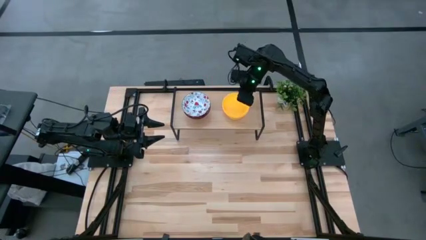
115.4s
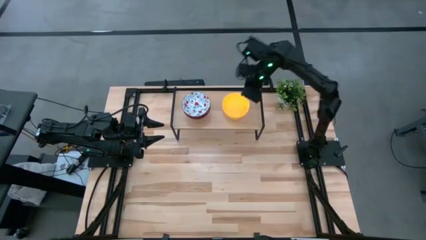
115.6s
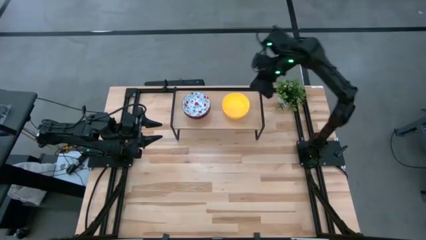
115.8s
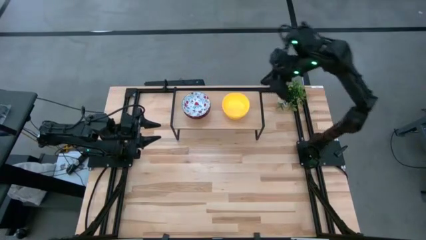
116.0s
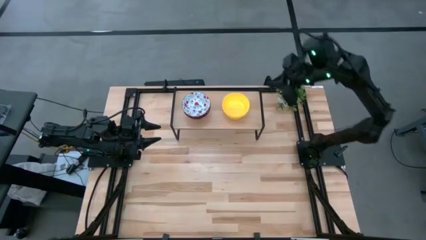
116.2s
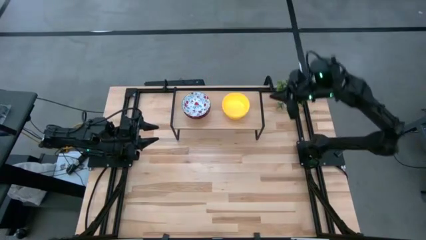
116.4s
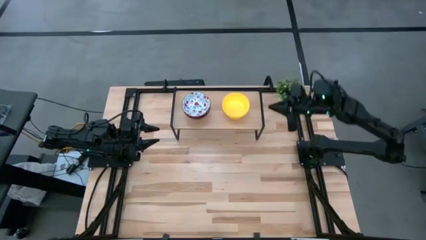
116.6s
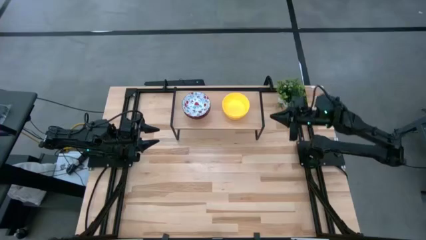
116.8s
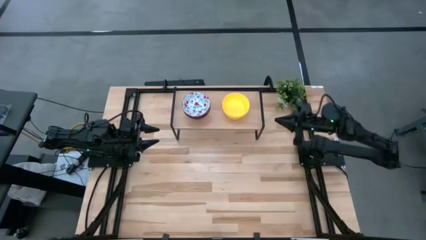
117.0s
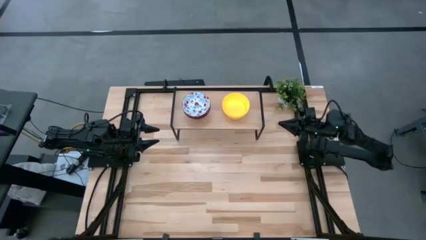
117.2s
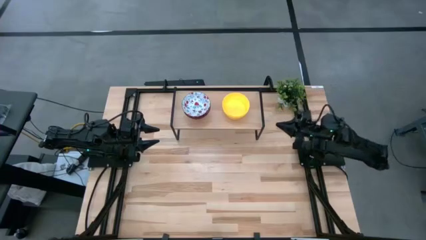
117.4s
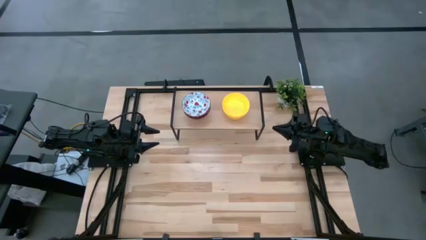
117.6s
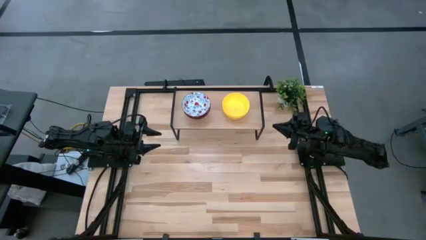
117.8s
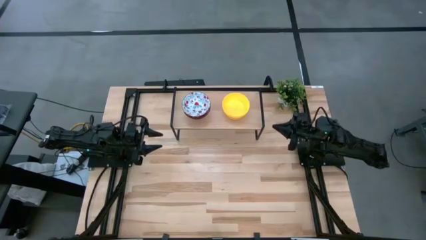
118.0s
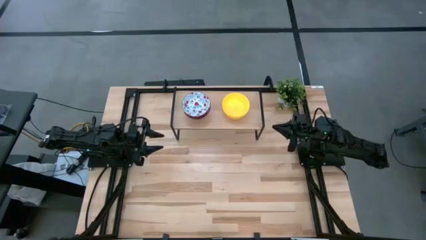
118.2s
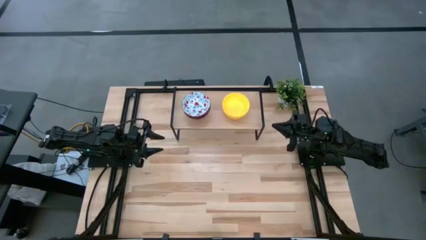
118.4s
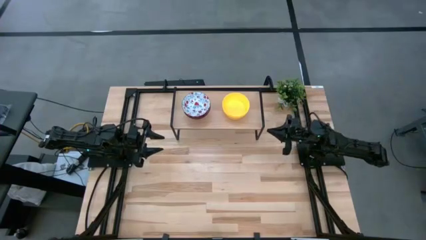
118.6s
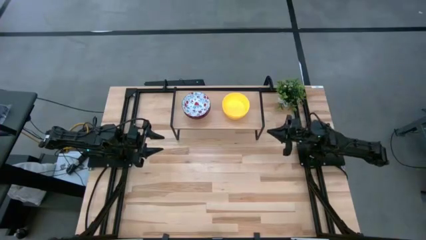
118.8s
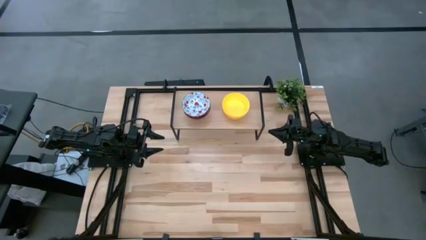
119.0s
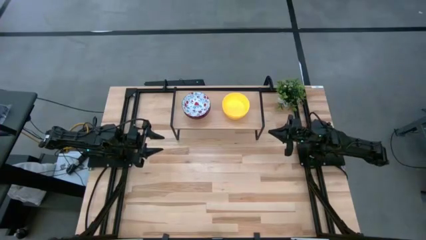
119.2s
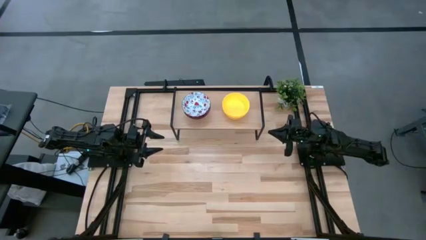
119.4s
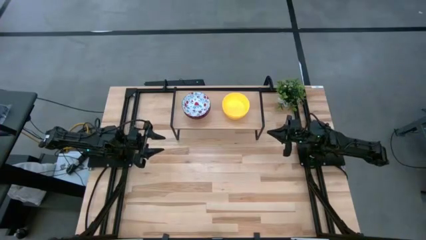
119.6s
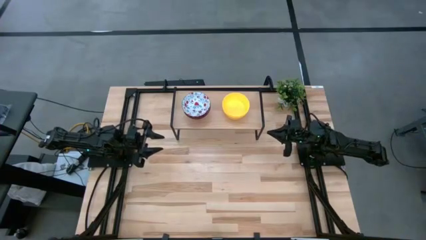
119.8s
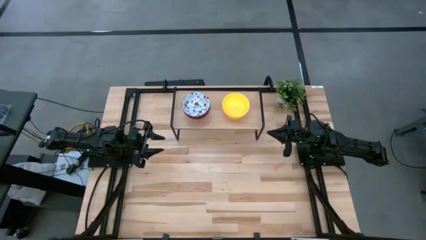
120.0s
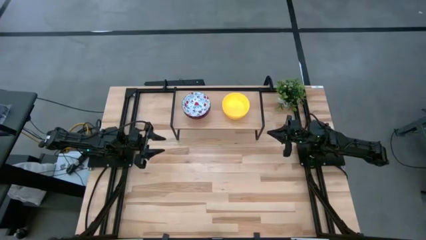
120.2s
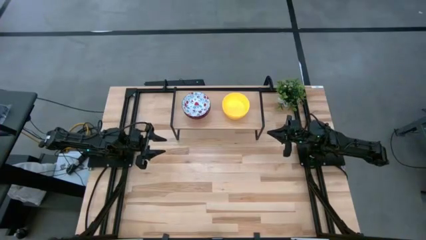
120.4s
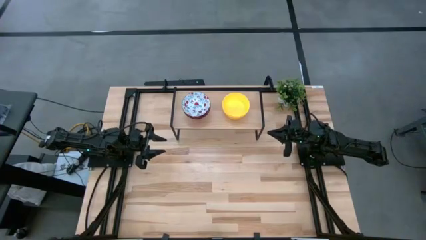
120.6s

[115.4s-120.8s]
Task: Pick & Place Mini bowls
Return to Home Position

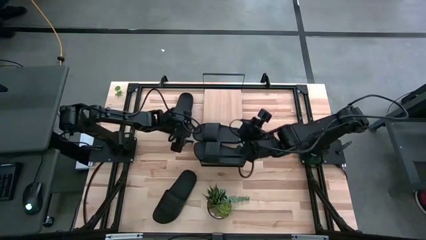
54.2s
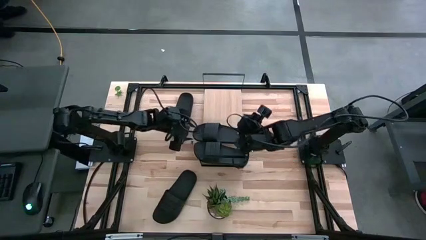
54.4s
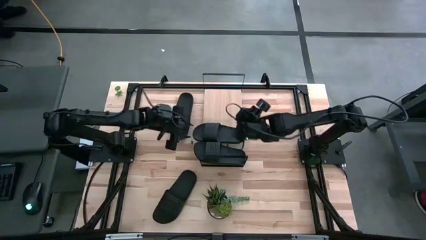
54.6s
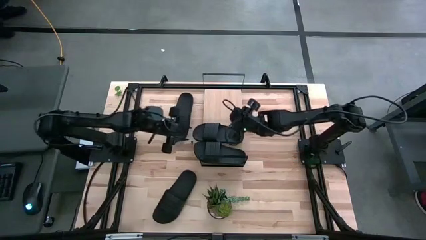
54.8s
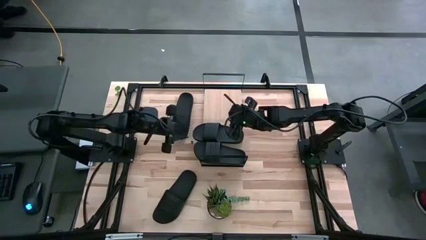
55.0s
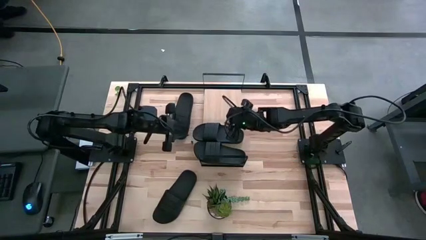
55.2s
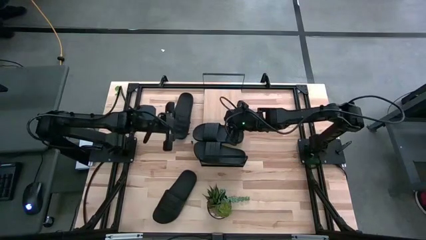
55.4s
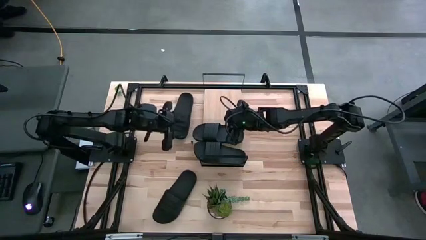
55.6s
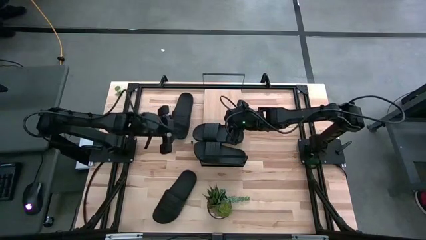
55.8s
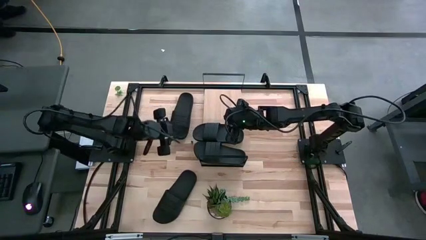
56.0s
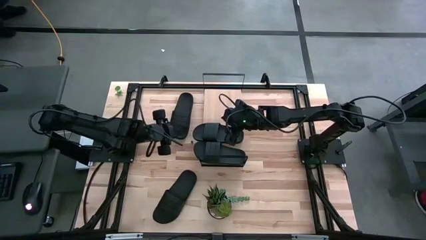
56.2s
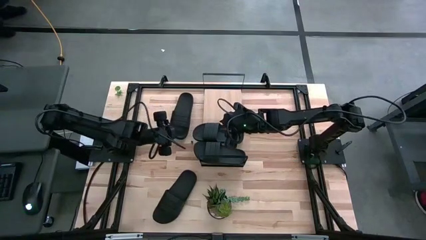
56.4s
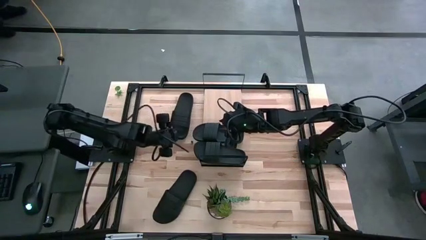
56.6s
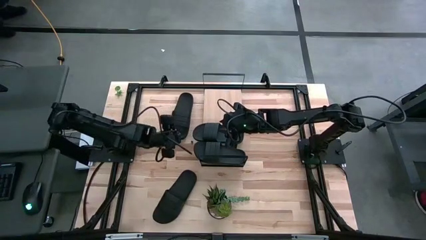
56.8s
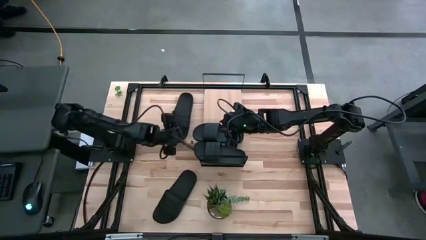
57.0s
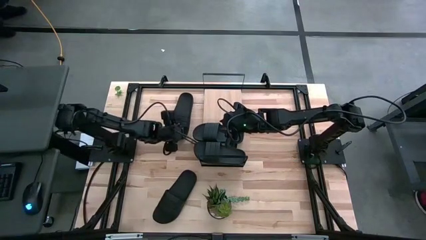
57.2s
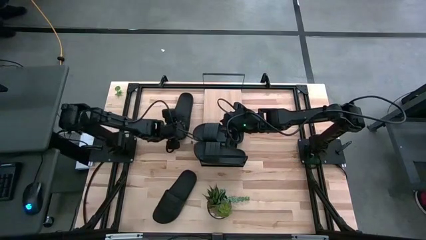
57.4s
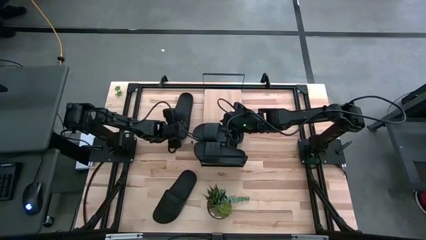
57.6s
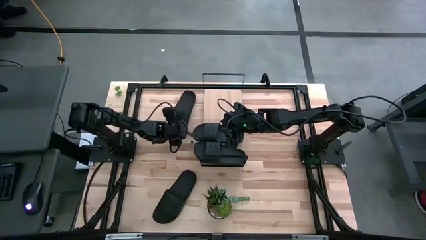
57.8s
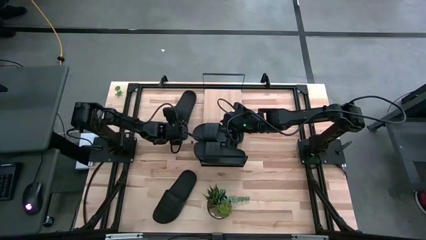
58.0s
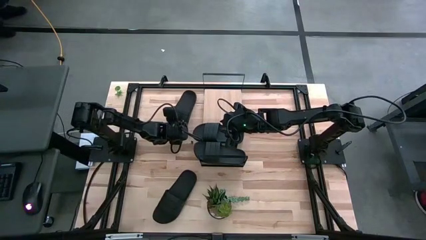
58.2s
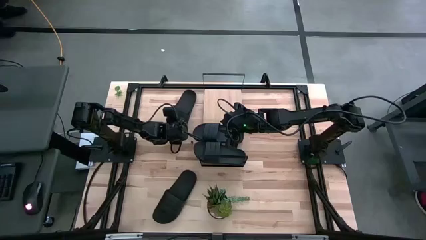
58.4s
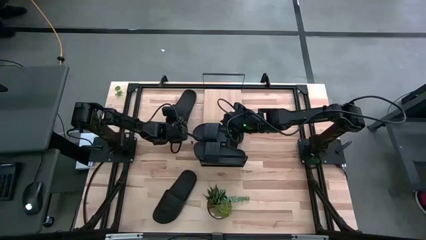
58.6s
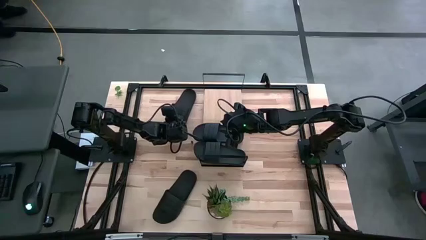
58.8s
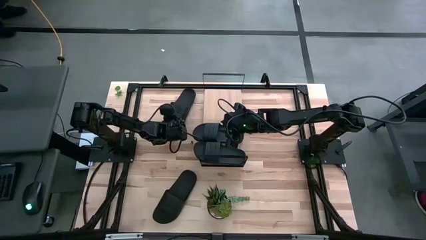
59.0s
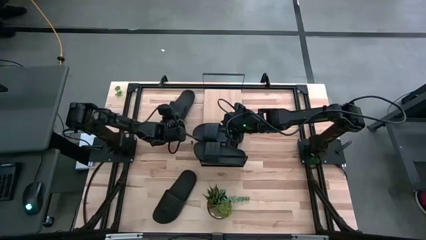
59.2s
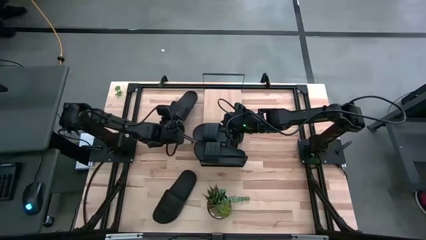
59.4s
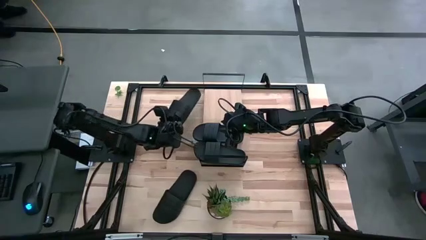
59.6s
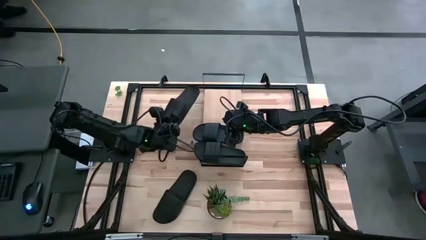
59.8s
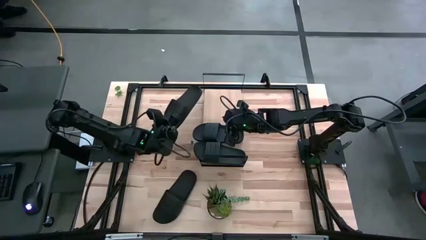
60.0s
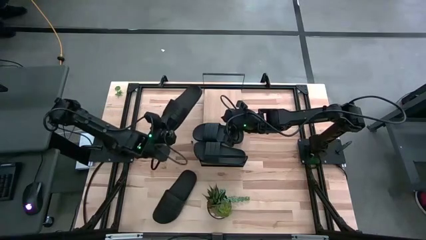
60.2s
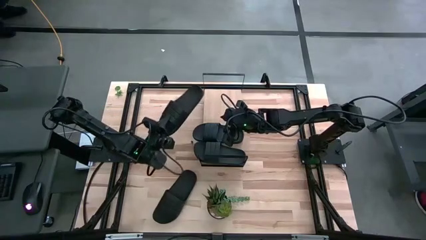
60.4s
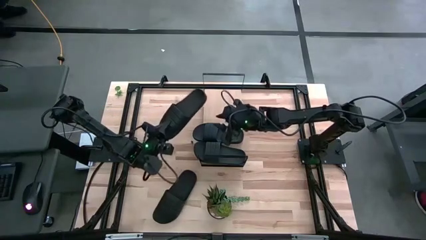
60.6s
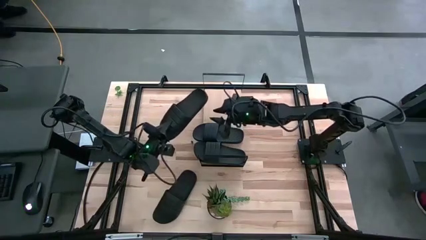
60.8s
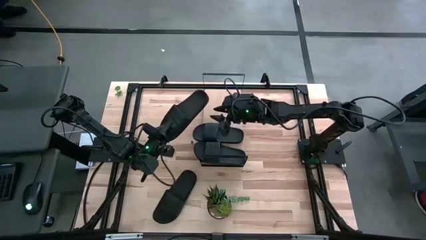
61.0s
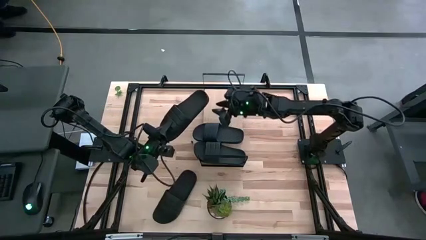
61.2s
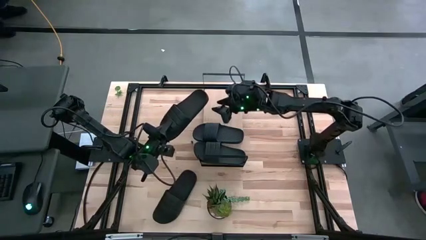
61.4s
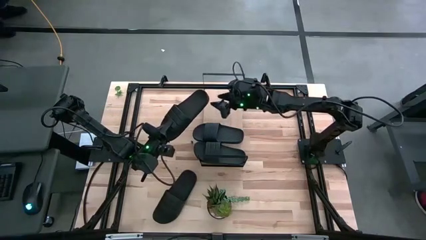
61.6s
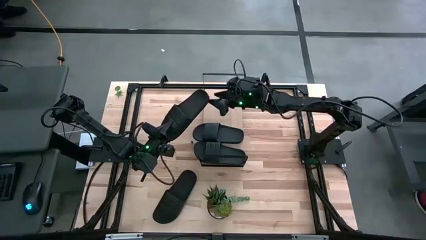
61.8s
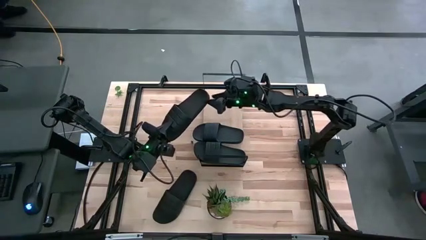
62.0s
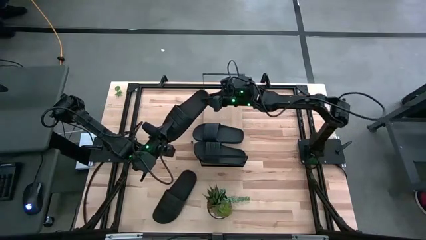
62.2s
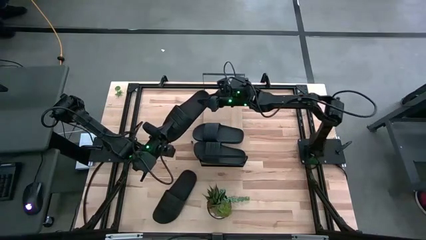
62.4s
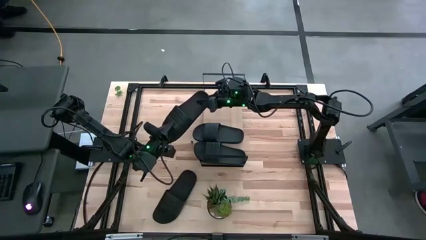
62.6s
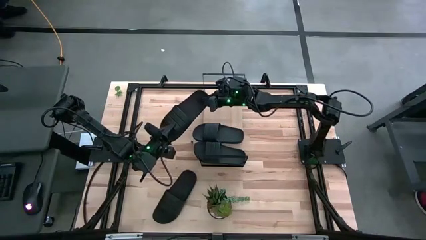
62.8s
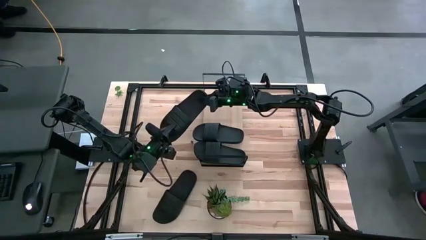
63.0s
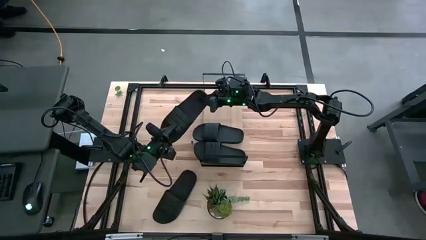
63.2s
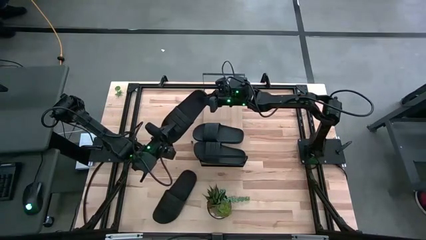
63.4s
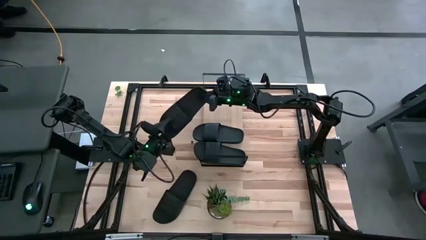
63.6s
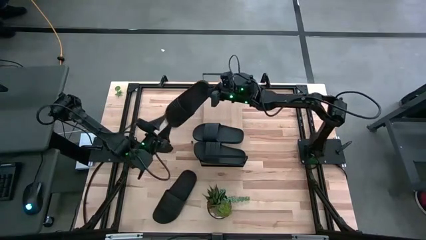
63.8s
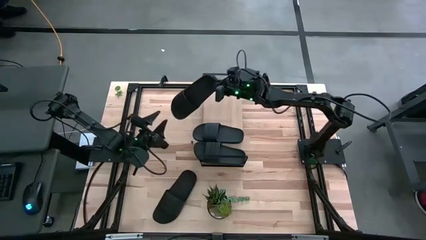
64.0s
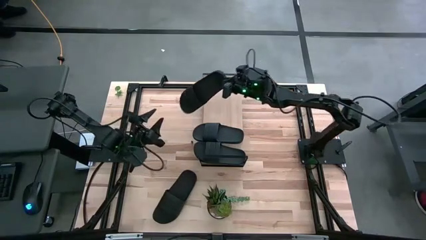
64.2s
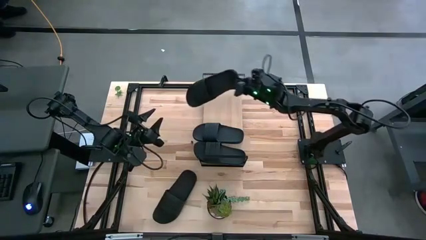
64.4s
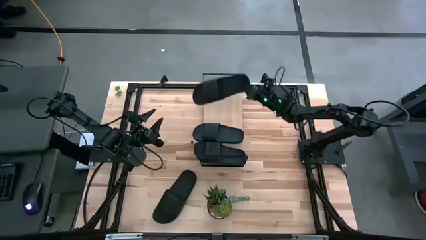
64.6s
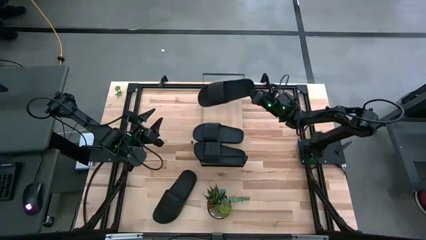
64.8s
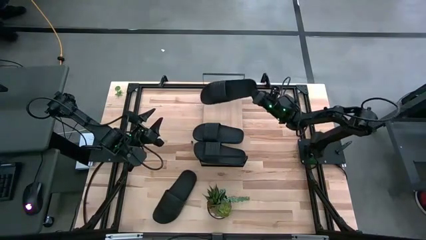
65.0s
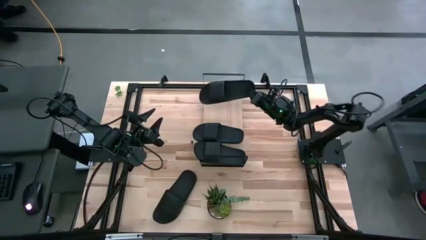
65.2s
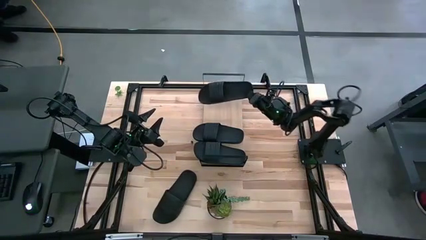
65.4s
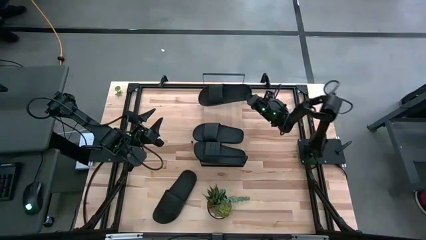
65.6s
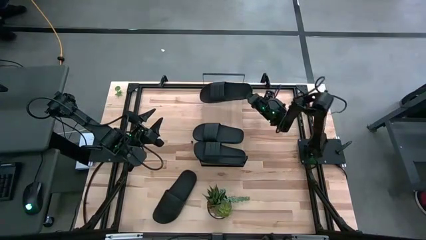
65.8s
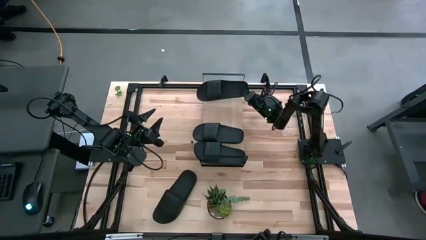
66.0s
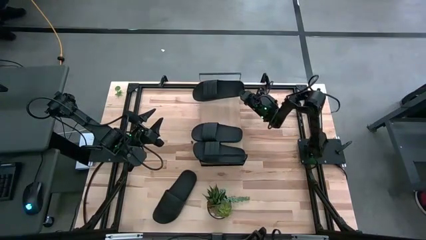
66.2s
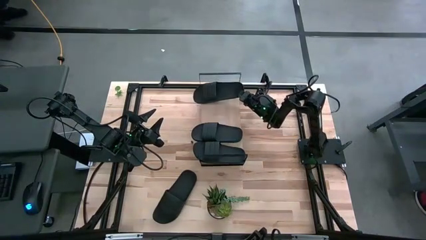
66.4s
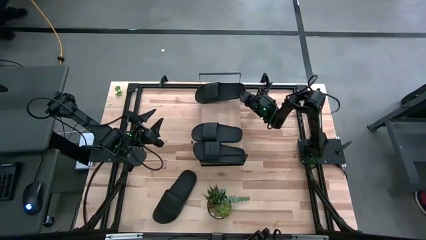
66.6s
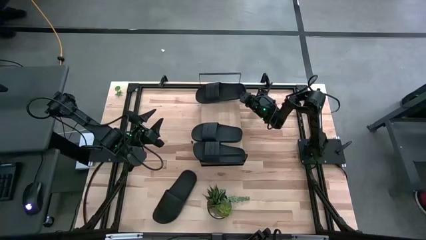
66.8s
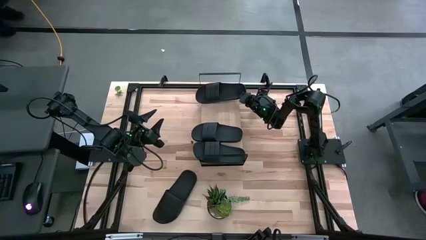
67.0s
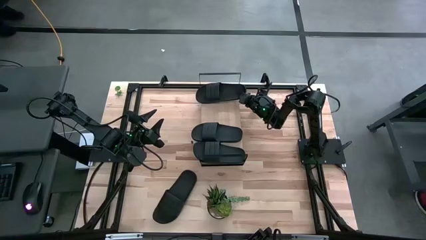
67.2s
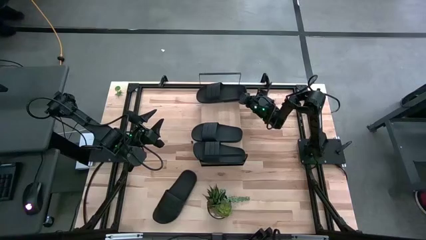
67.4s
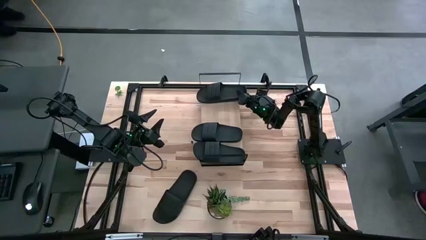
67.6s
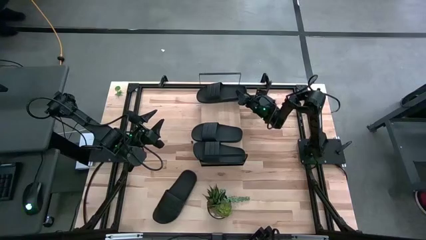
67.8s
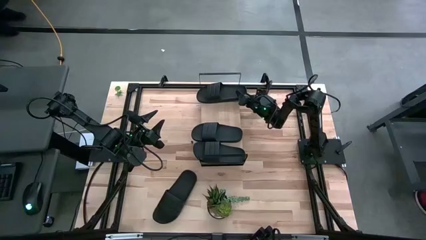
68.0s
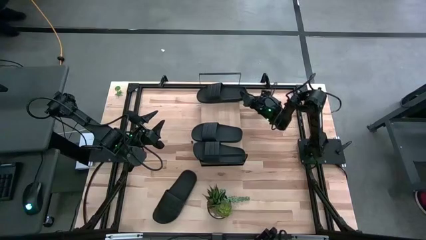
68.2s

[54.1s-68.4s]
Task: Pick and place slides into the shelf
Put the top black slide on the shelf
